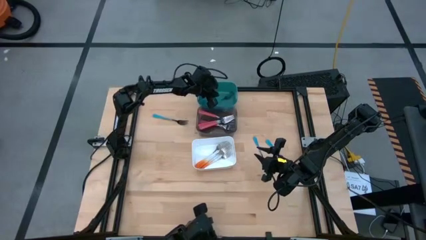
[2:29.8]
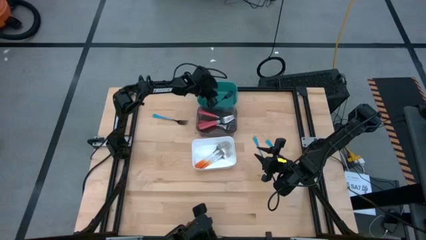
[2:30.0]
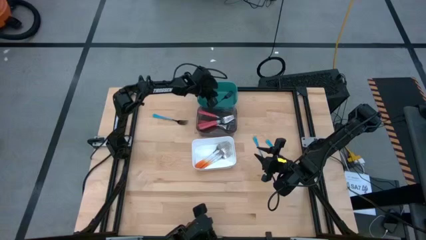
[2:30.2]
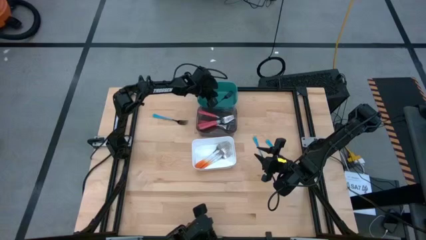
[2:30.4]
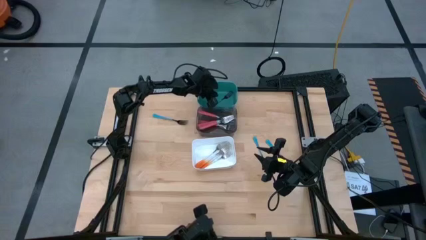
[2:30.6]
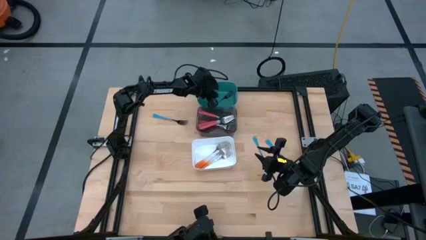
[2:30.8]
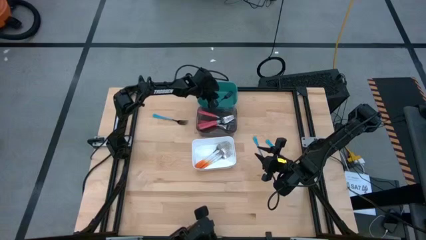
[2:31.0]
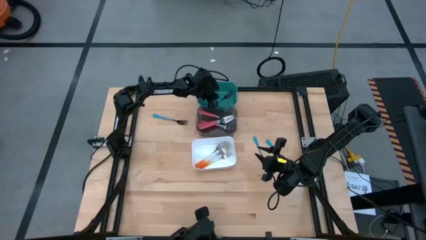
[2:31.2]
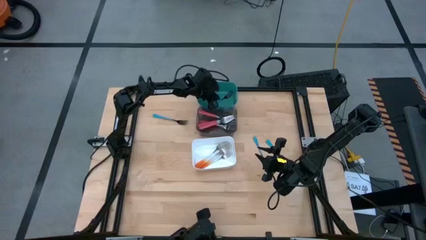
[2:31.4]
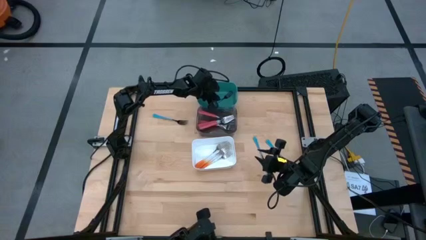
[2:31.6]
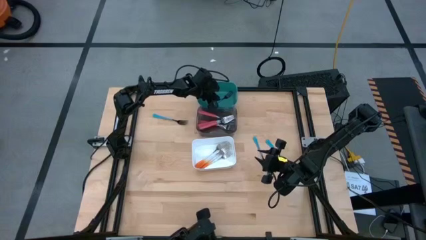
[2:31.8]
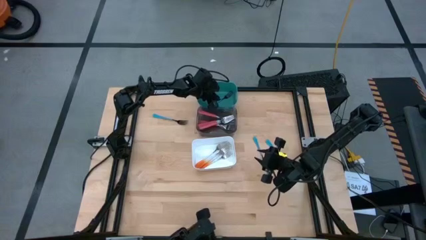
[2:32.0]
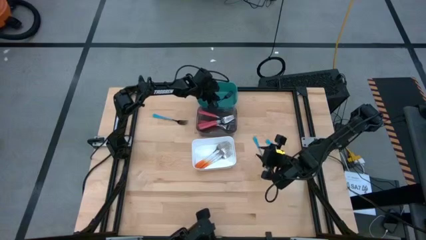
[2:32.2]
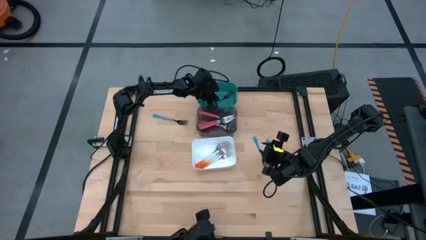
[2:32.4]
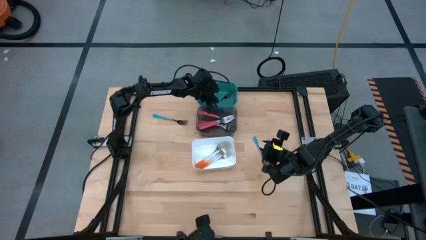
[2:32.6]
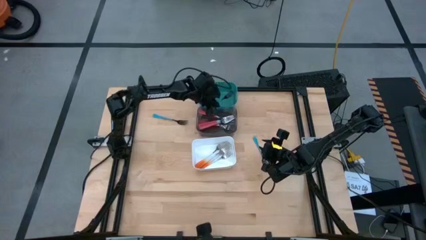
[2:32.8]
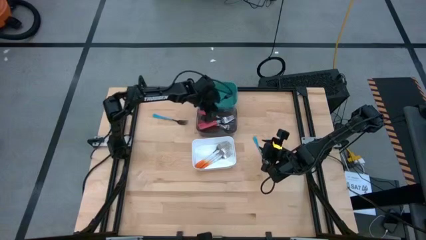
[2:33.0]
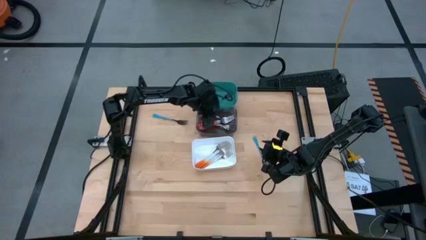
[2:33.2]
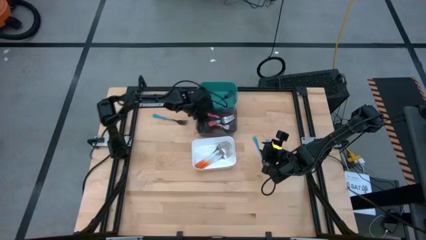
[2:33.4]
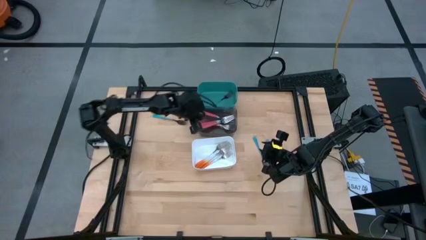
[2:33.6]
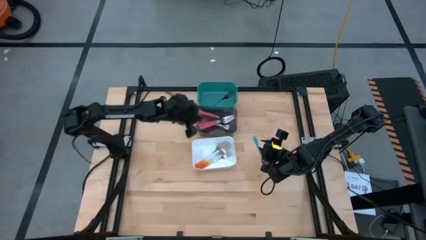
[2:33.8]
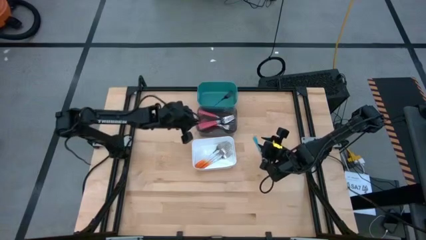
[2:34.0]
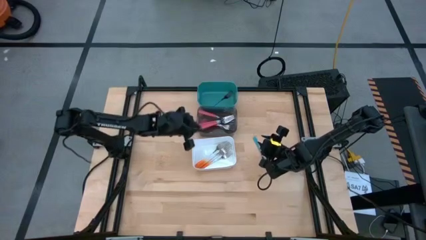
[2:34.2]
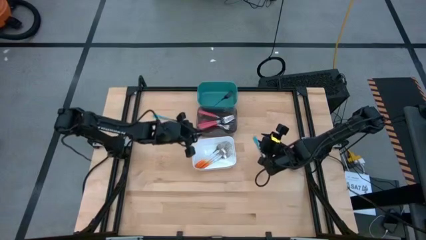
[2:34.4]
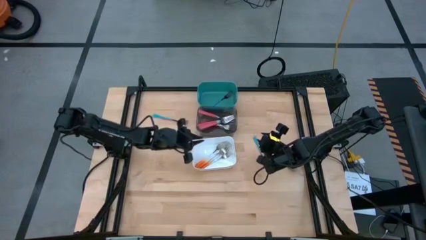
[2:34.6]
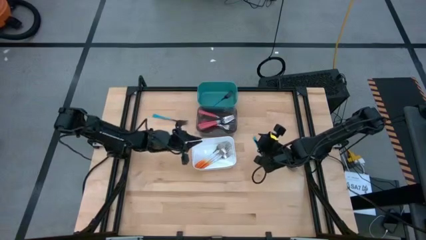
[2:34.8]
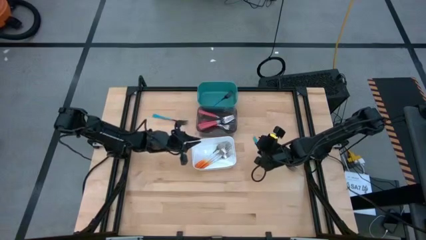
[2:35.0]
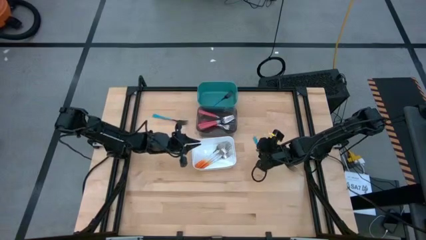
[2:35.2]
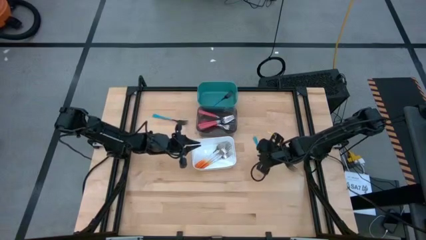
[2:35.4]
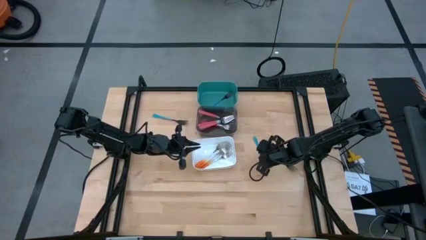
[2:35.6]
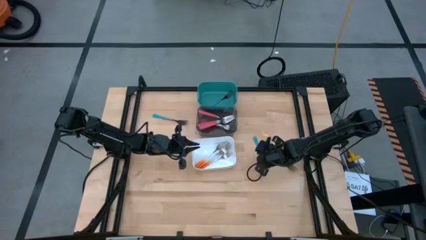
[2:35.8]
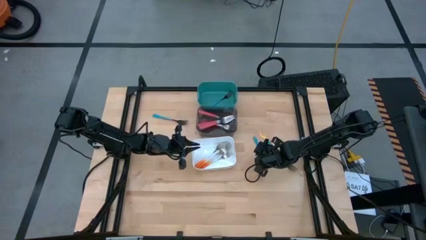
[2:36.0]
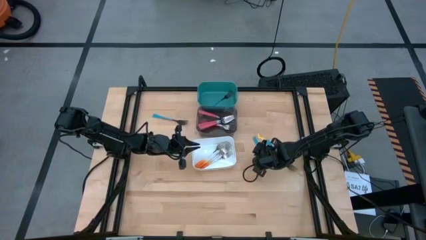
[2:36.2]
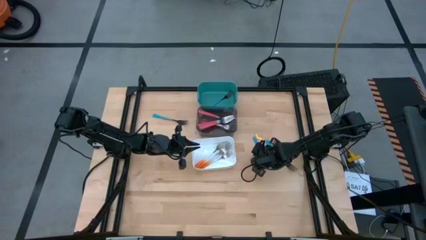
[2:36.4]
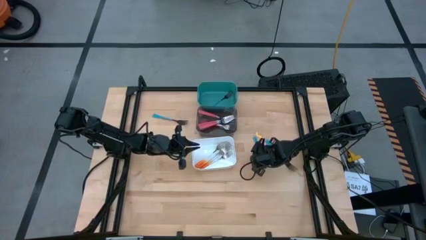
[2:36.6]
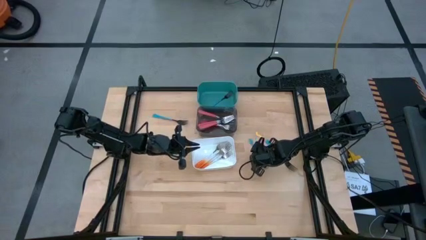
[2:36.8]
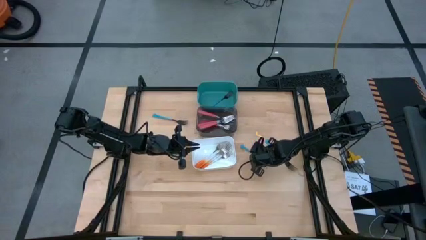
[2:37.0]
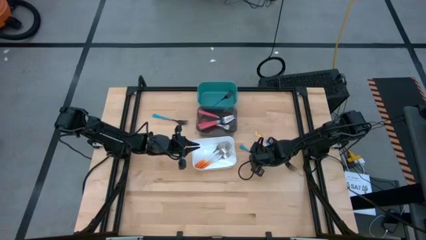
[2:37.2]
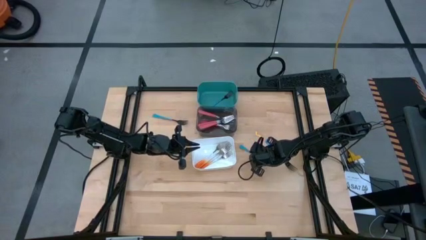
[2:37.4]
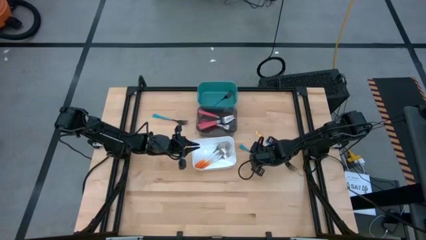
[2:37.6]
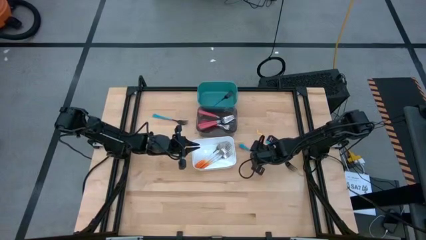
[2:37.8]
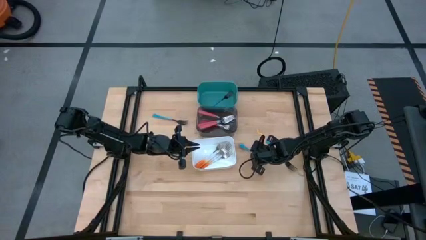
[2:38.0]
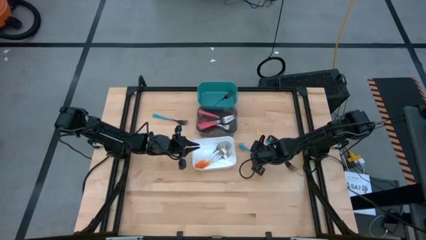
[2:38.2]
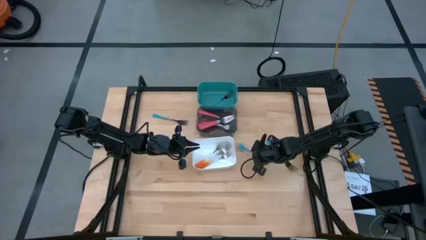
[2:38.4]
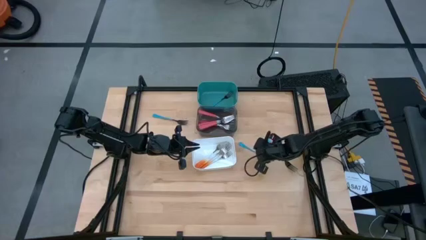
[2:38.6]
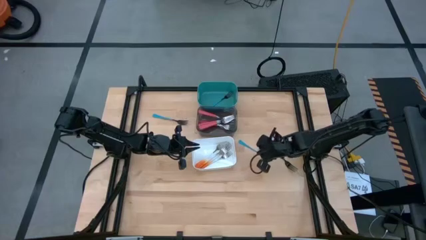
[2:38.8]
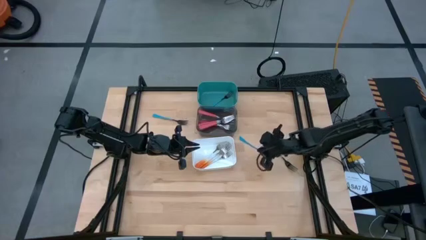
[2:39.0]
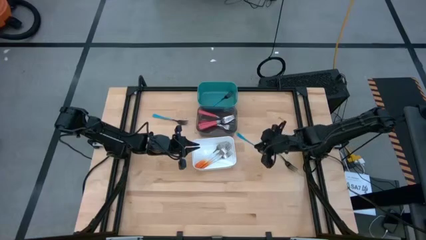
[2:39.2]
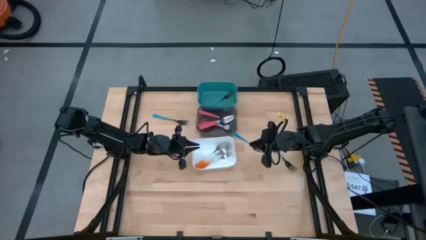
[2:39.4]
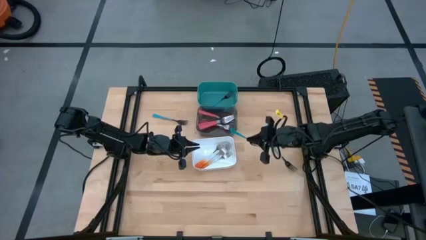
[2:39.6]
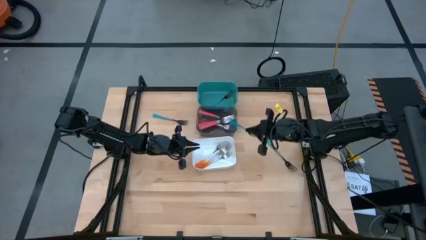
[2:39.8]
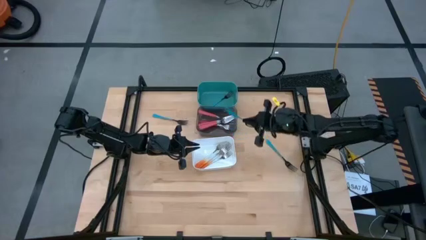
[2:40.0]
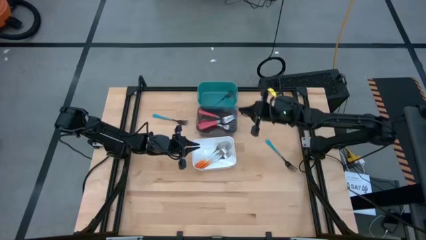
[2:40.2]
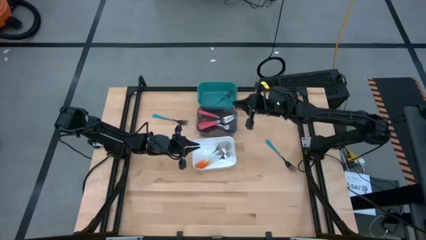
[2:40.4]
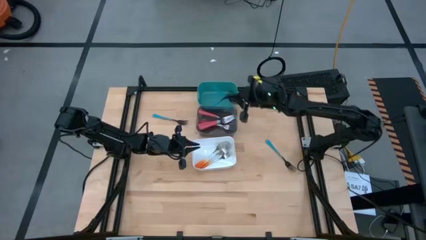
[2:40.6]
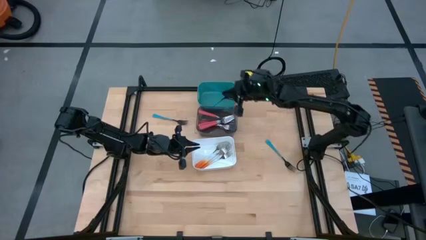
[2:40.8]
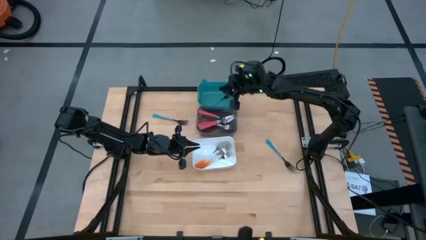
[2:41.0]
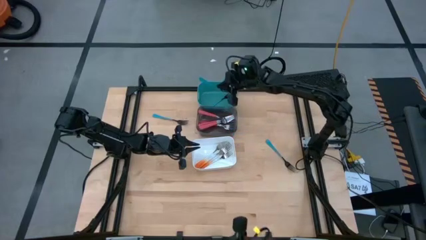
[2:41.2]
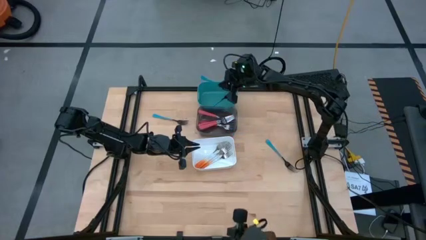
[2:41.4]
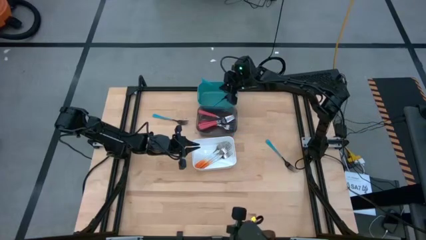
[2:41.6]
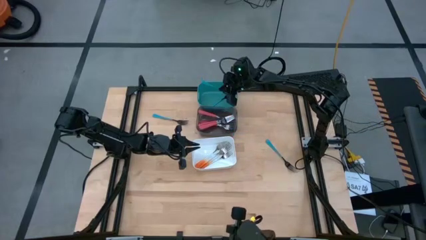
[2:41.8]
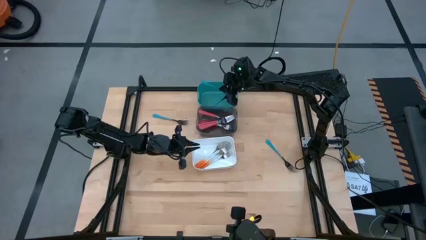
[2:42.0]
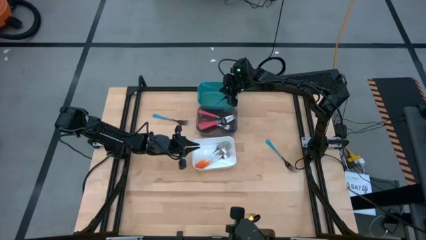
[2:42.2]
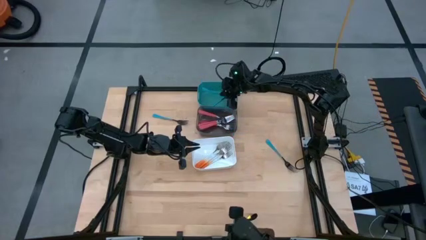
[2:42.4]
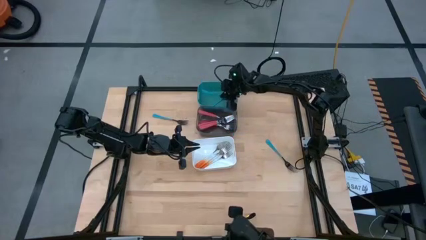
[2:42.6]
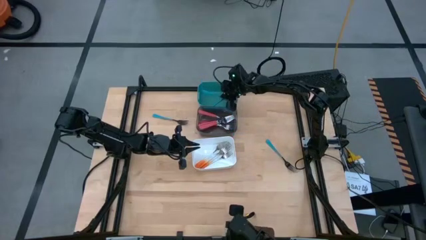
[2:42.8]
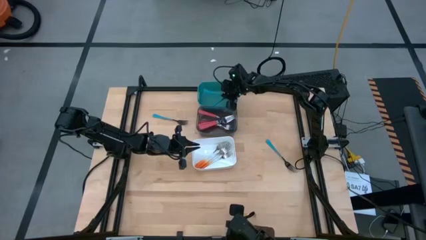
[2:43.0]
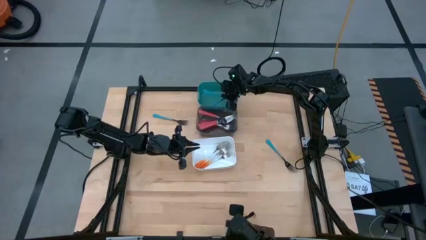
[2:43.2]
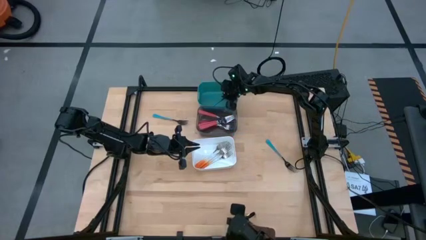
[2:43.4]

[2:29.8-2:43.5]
Task: Sort silverware by color (type)
Put the bottom left blue fork into the blue bin
